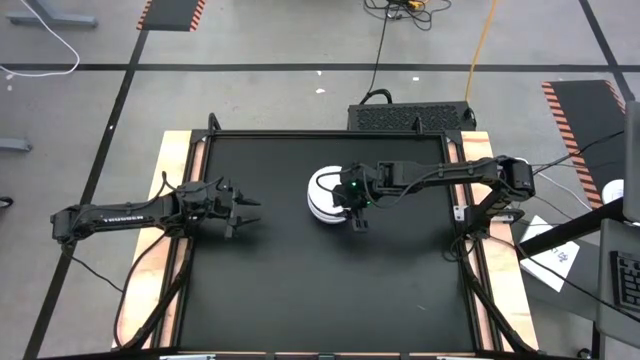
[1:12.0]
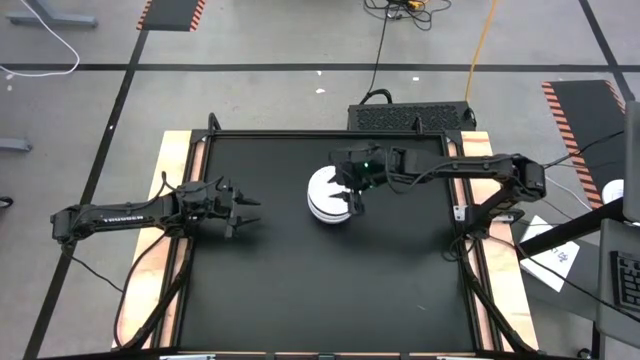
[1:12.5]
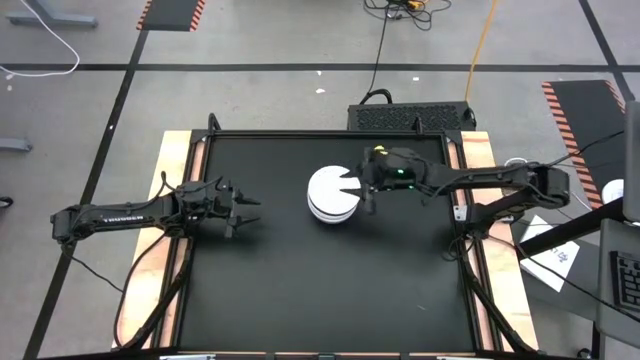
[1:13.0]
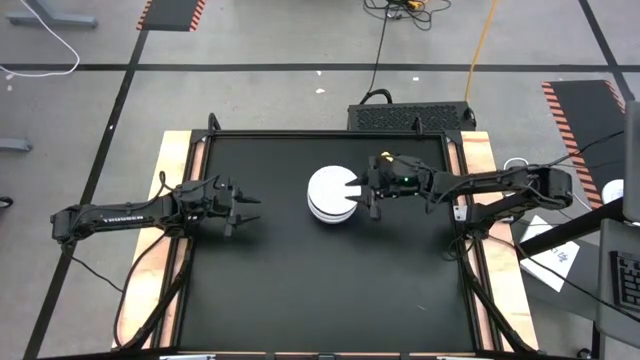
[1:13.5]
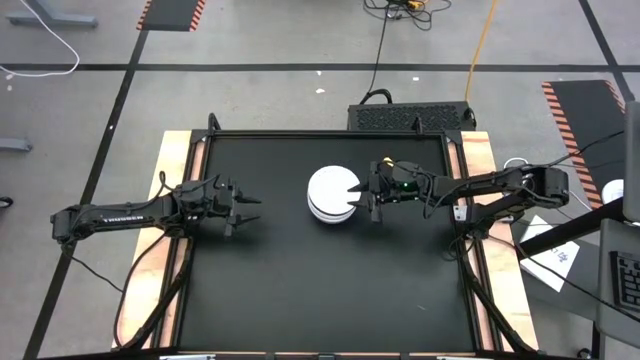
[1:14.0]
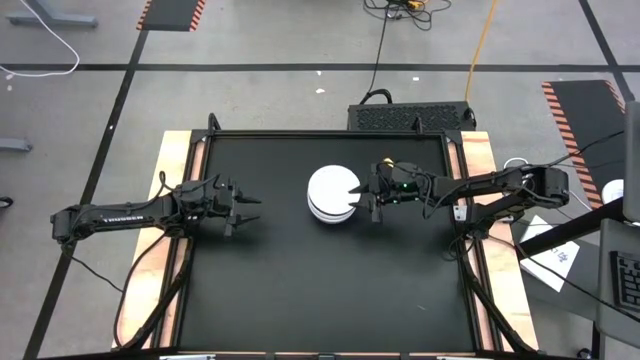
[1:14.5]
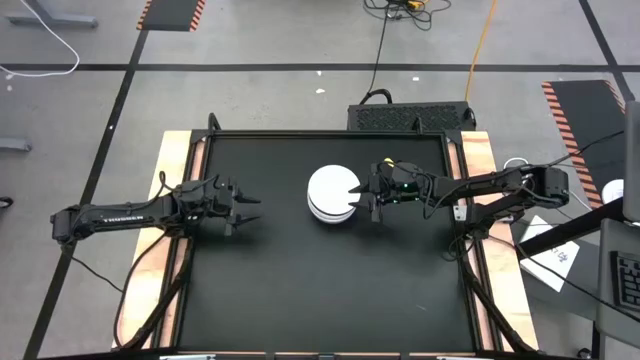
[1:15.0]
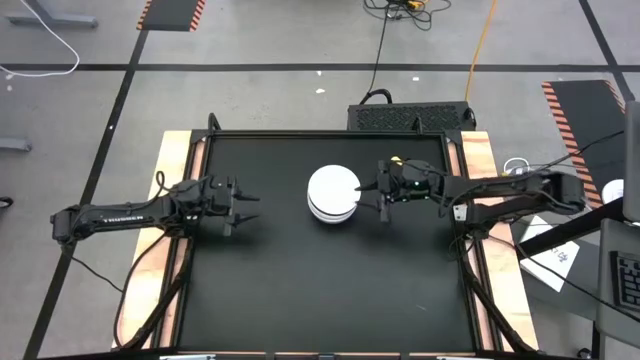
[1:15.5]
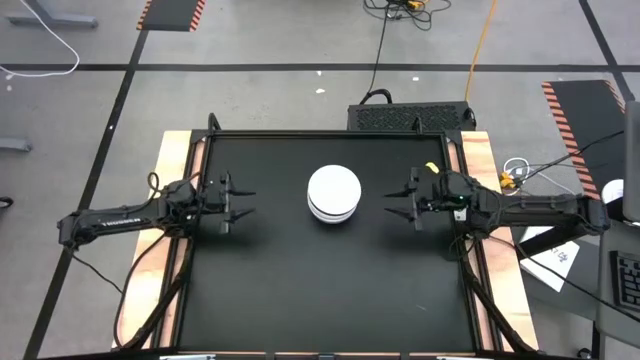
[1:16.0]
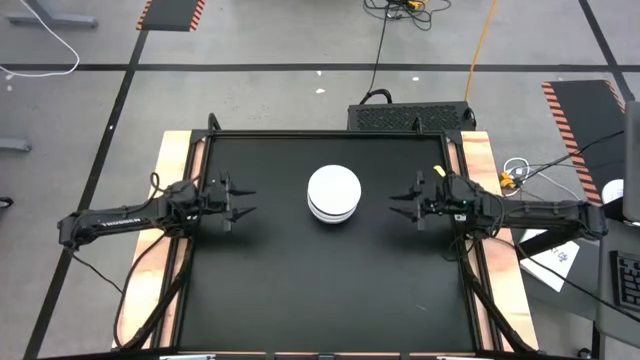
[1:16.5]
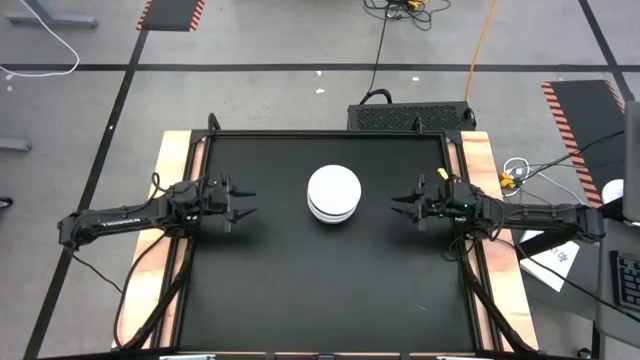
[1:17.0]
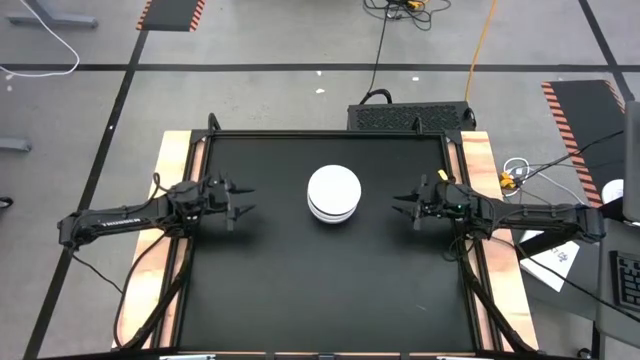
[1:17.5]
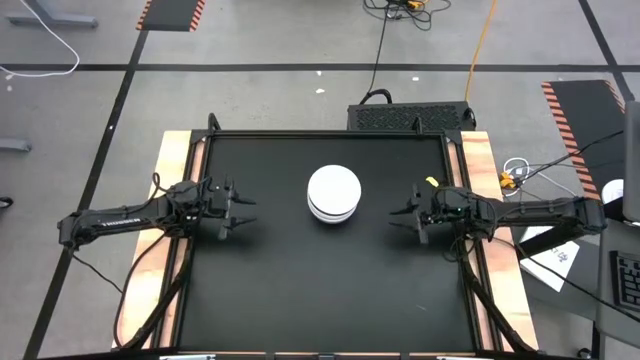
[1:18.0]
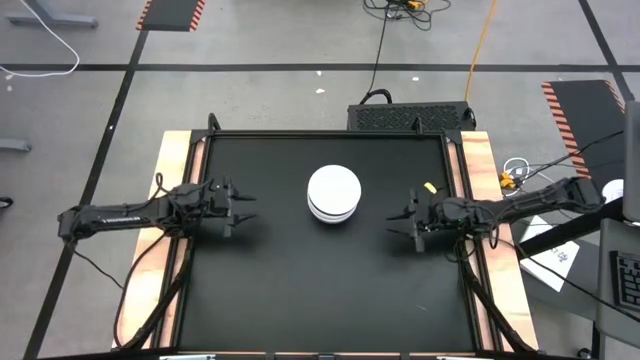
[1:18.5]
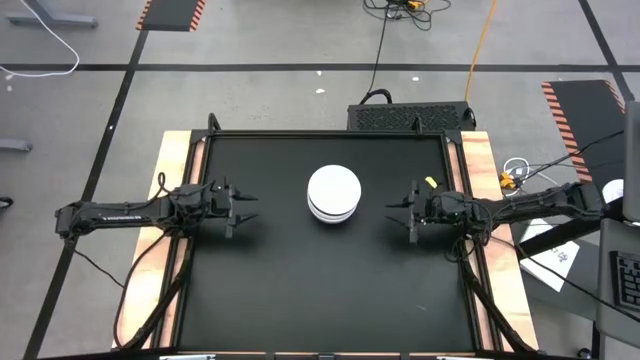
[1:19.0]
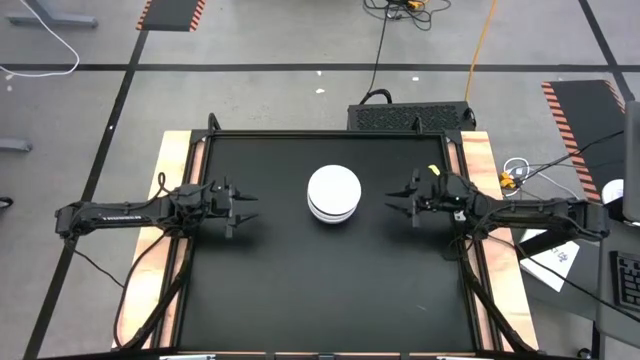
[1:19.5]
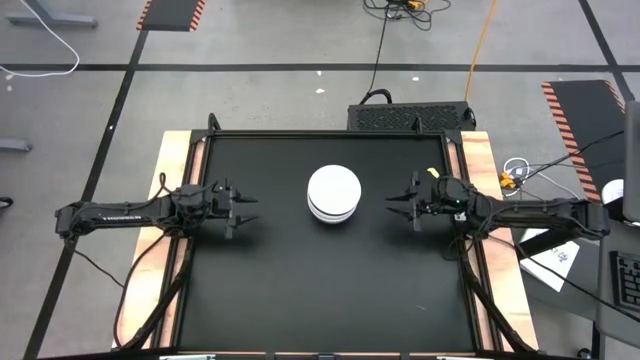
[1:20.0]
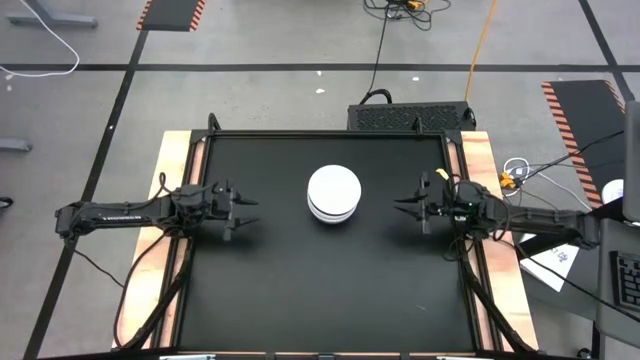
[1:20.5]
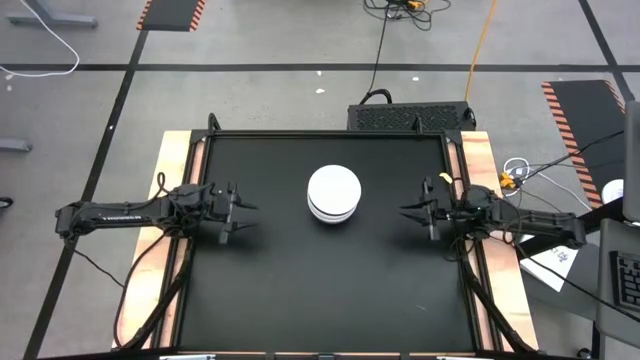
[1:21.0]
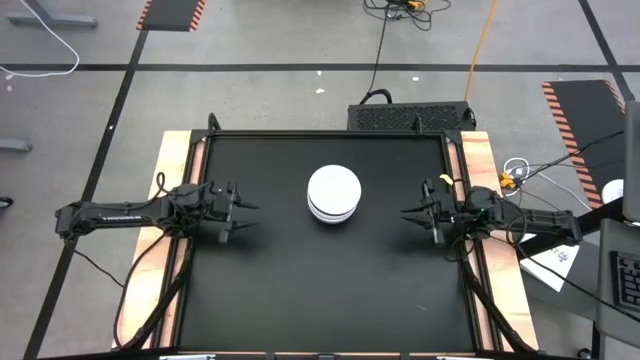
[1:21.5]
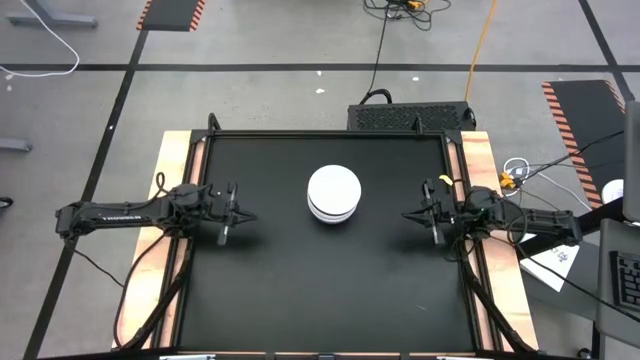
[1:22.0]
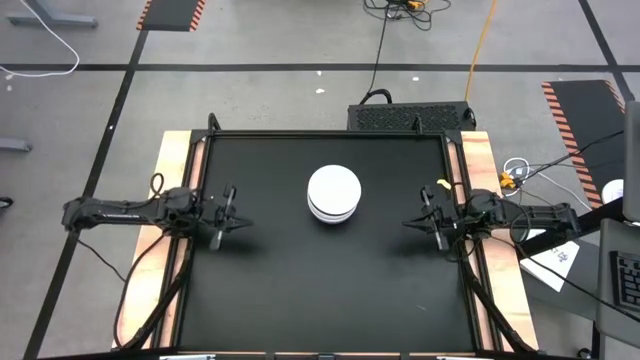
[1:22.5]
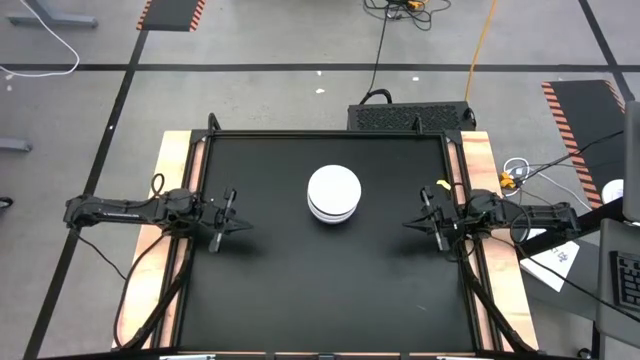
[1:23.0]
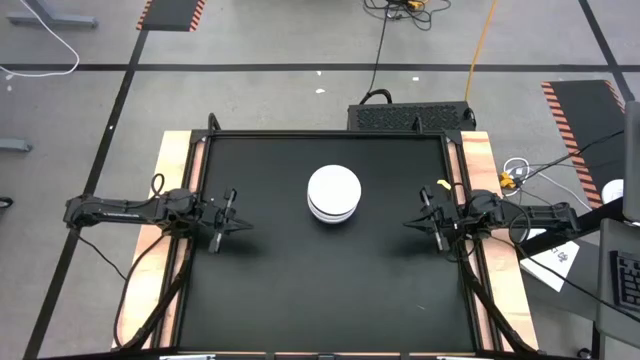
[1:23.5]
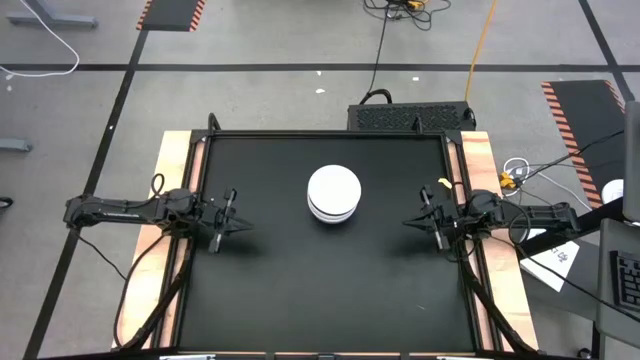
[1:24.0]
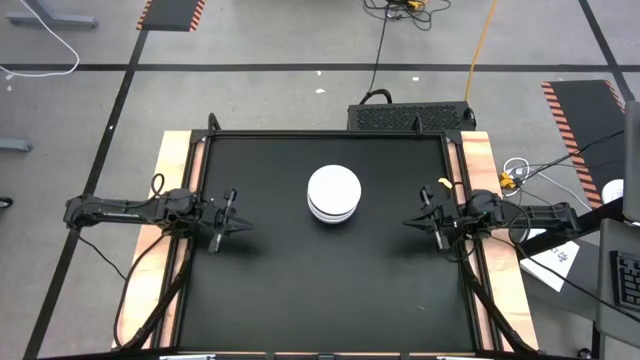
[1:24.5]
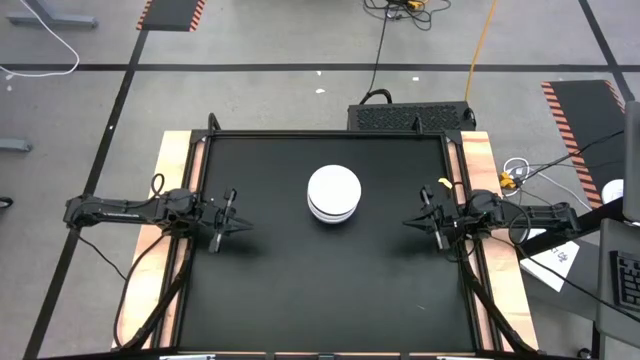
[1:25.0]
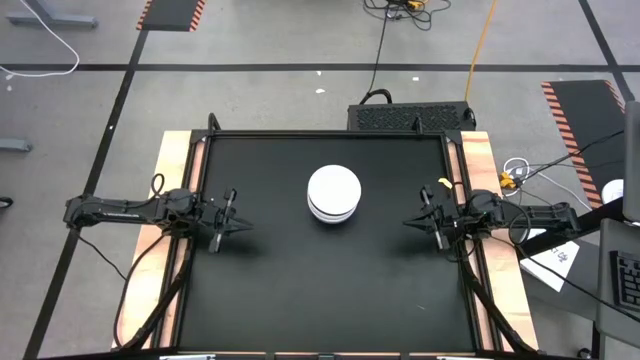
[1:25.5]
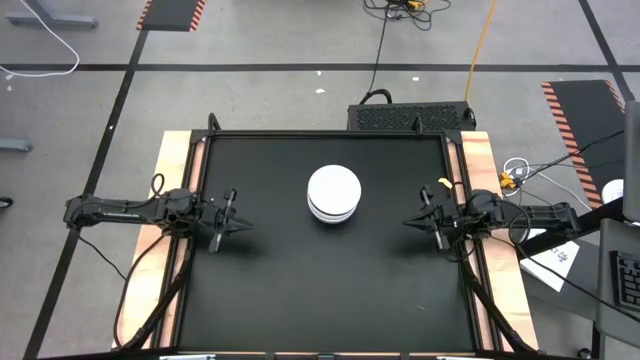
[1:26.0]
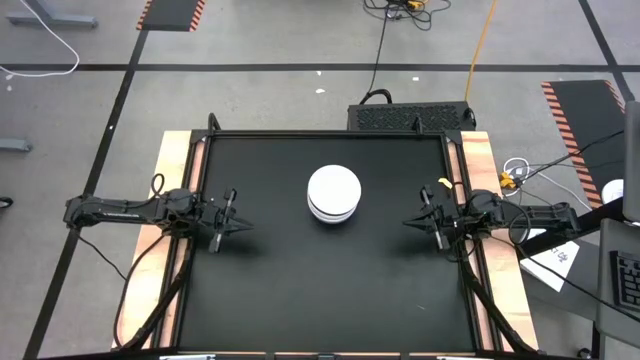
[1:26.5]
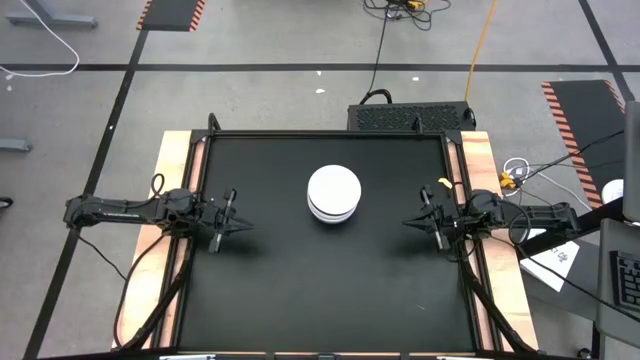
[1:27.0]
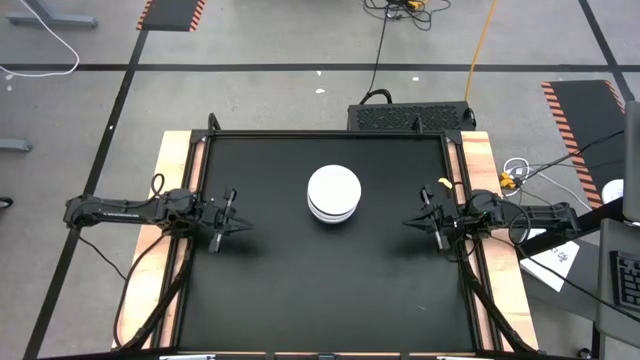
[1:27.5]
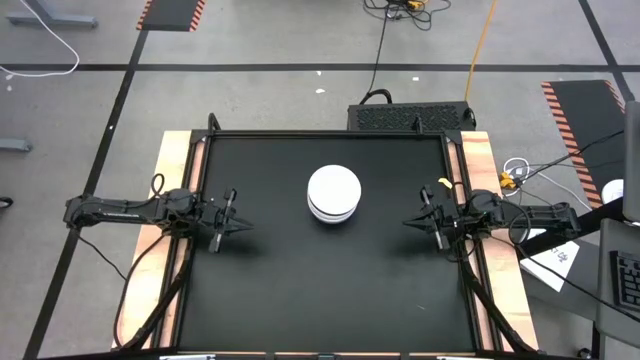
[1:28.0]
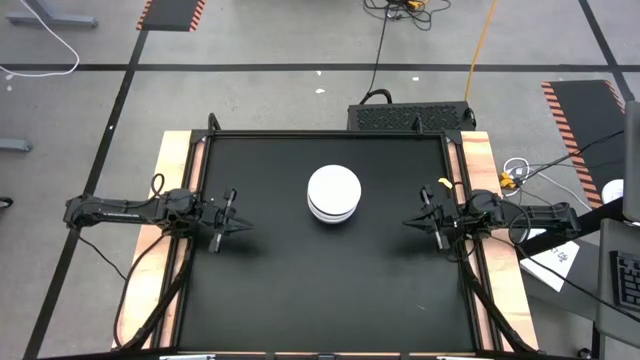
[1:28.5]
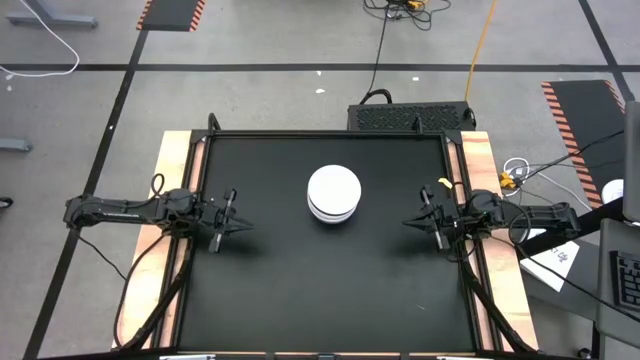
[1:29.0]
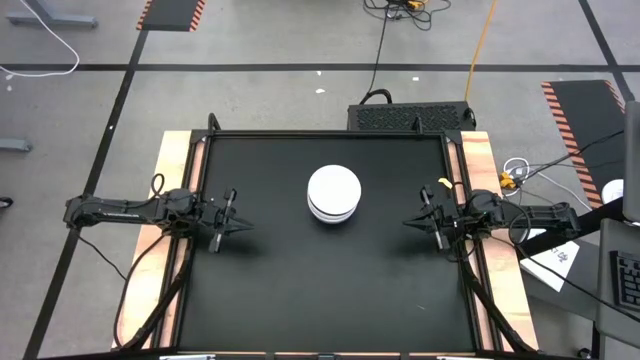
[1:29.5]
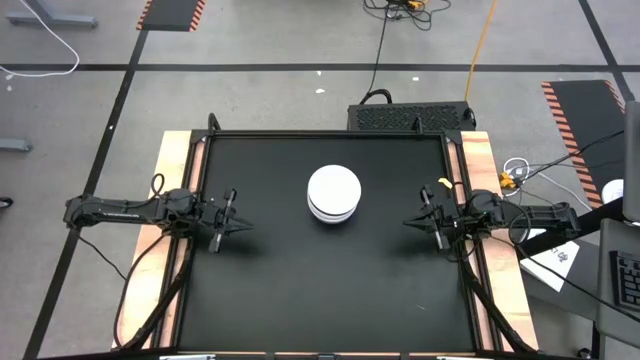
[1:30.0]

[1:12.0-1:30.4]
Task: Nest bowls inside each other
Return to Home Position

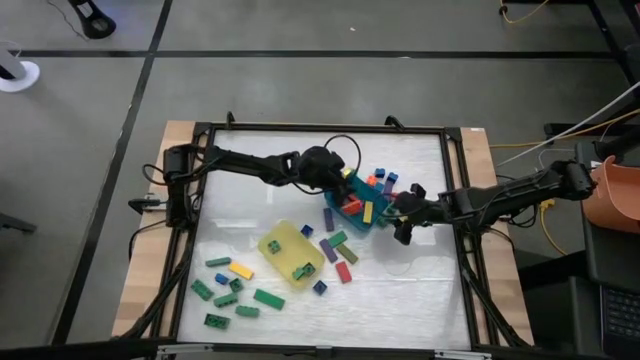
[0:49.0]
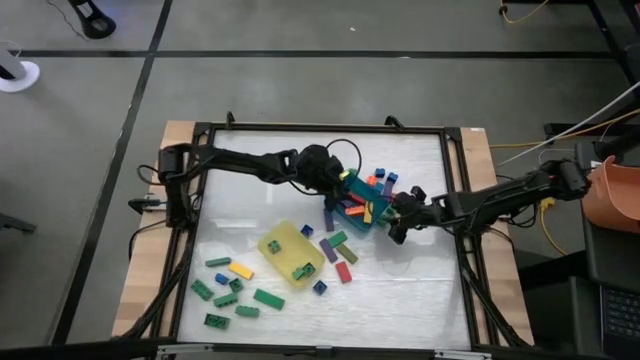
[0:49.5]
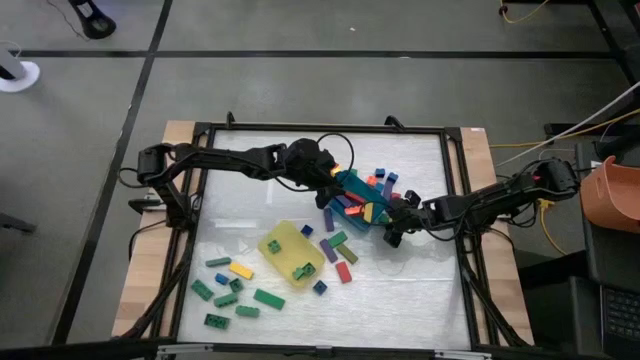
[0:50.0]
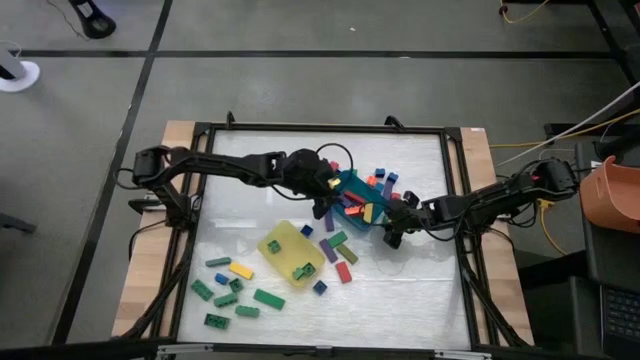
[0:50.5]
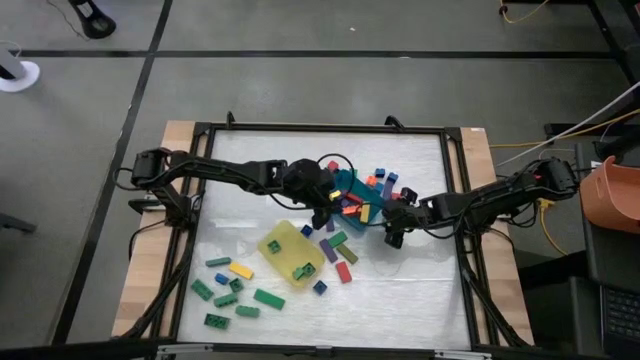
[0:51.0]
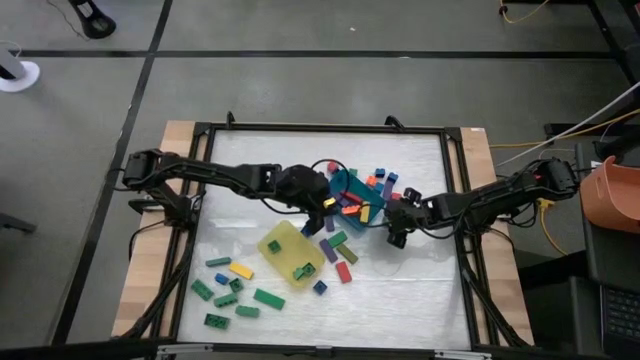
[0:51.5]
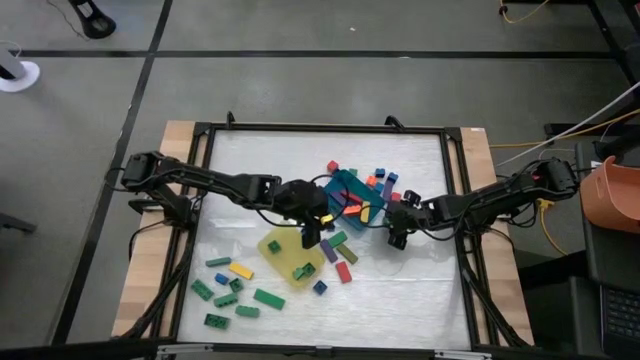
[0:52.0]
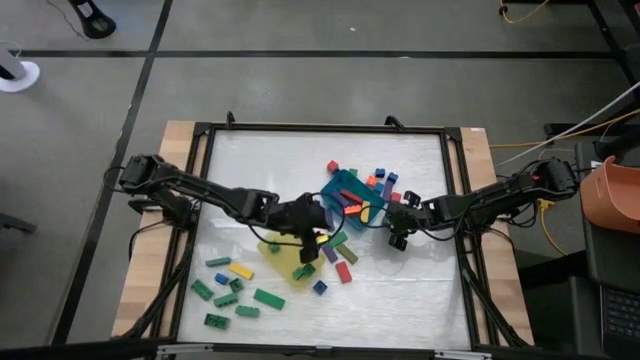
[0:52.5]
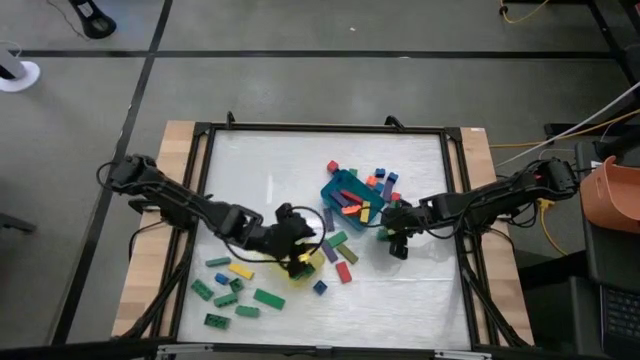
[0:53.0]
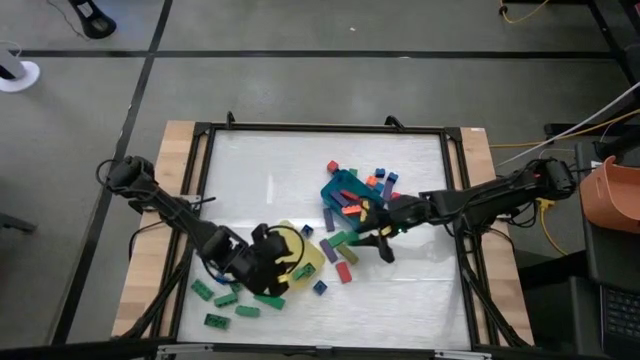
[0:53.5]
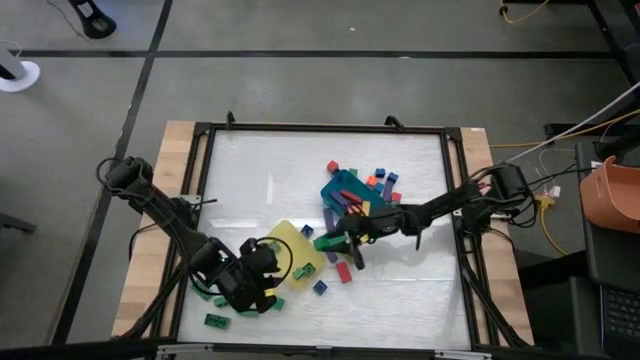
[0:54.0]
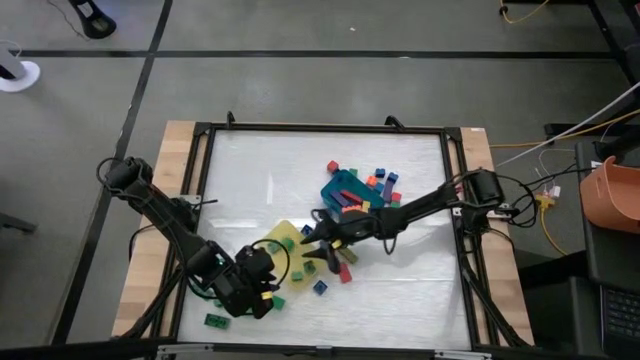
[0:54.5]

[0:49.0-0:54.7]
Task: Sort blocks by size
Put the small green wooden block into the yellow bin
